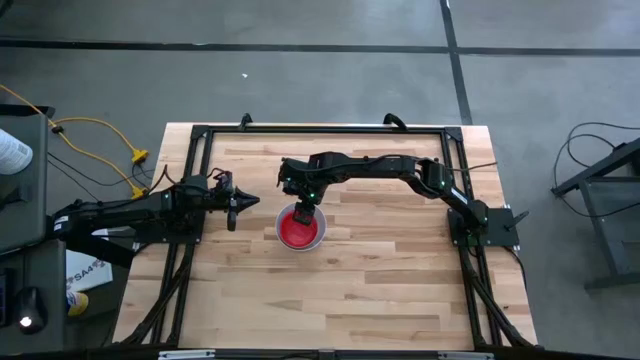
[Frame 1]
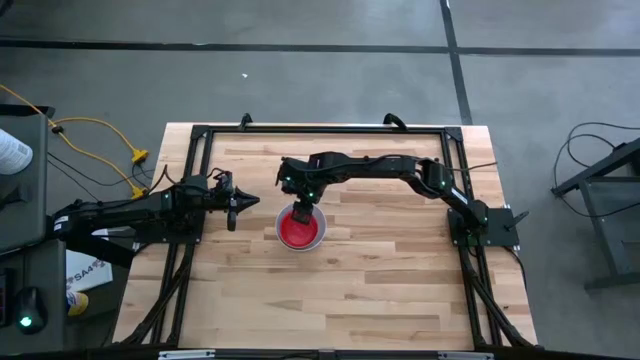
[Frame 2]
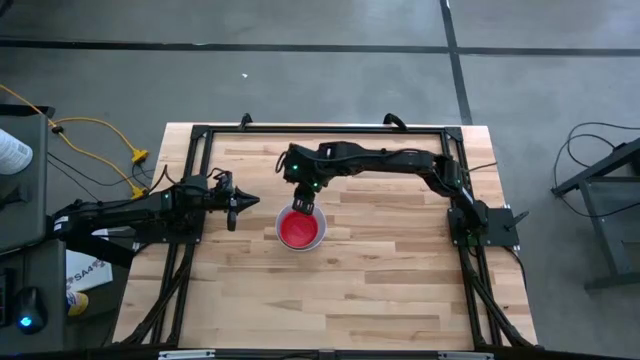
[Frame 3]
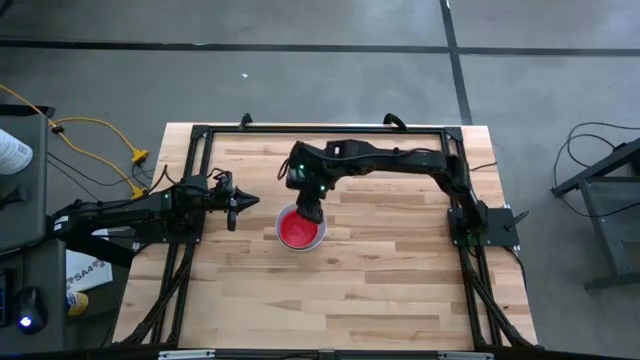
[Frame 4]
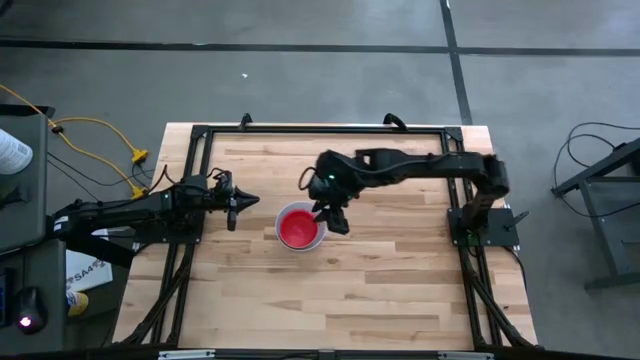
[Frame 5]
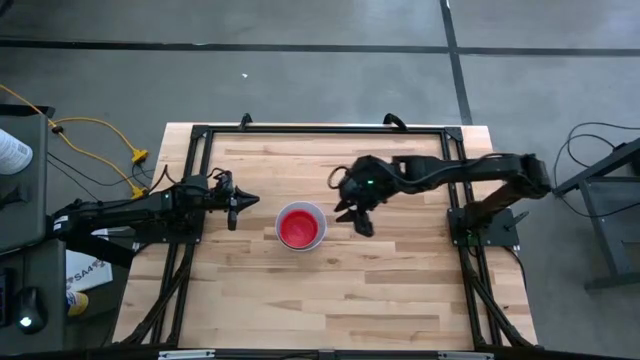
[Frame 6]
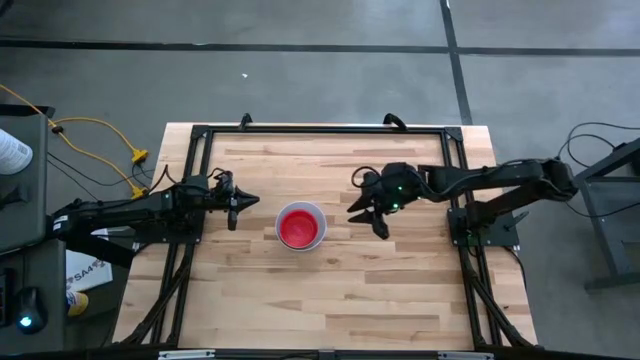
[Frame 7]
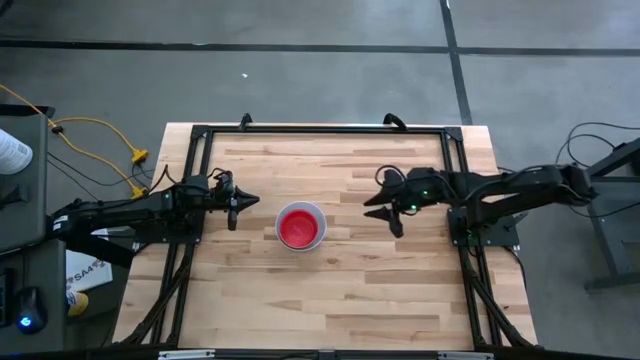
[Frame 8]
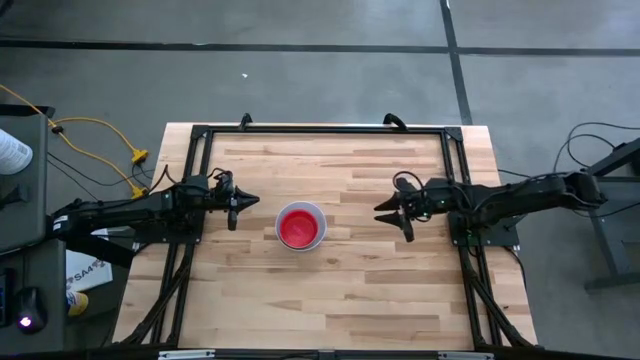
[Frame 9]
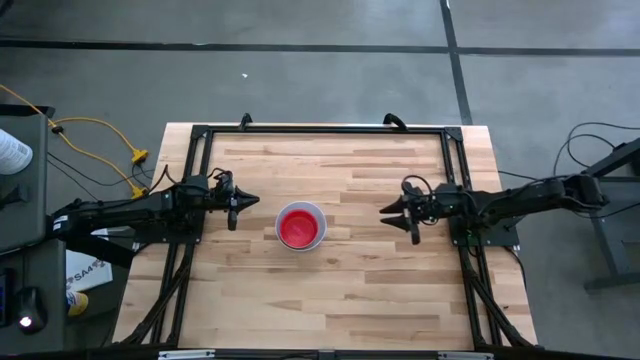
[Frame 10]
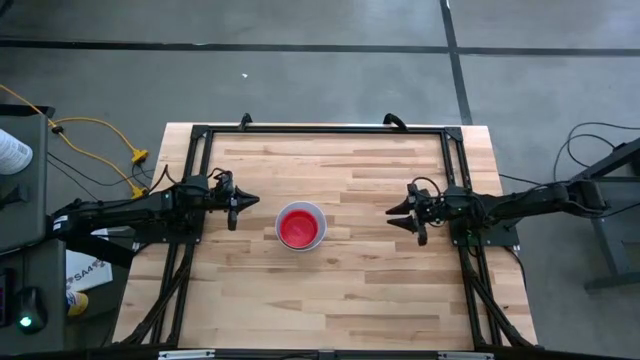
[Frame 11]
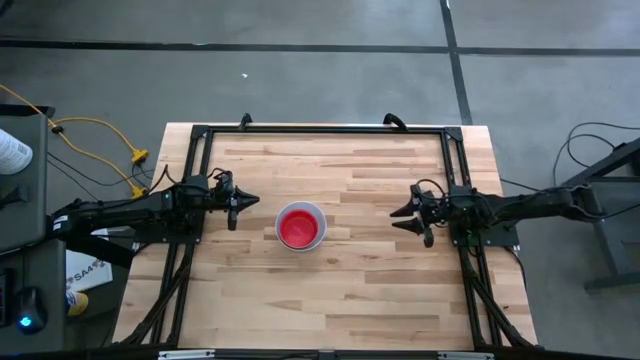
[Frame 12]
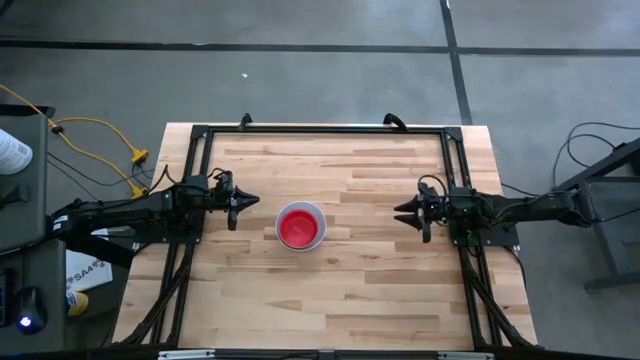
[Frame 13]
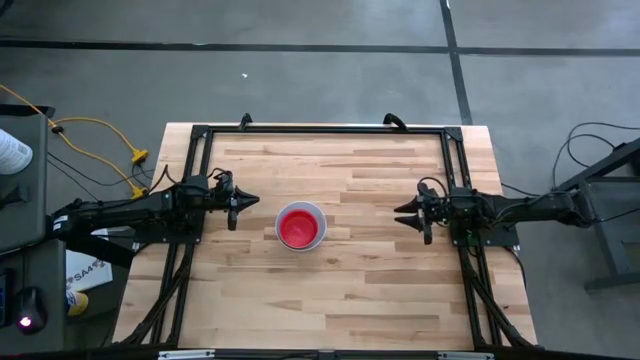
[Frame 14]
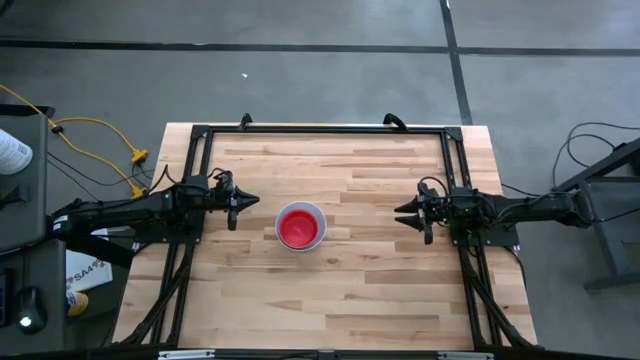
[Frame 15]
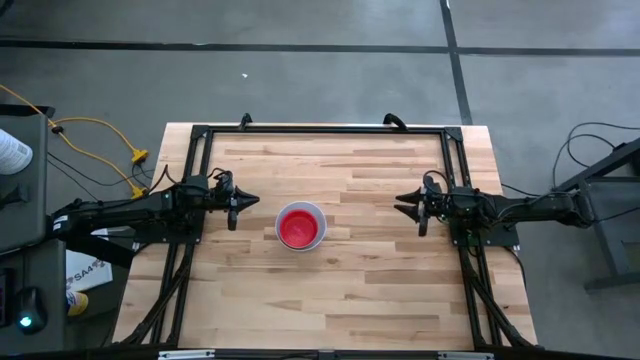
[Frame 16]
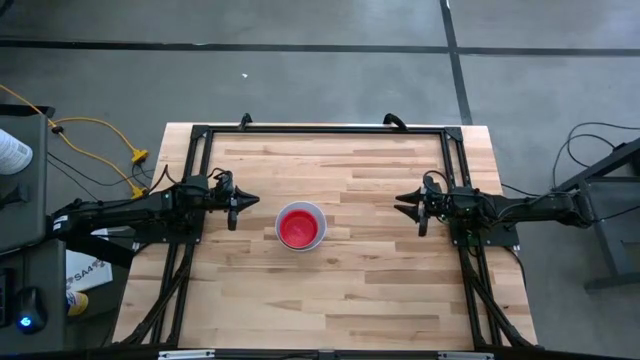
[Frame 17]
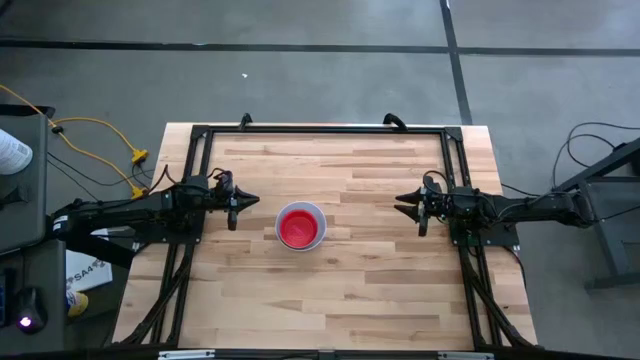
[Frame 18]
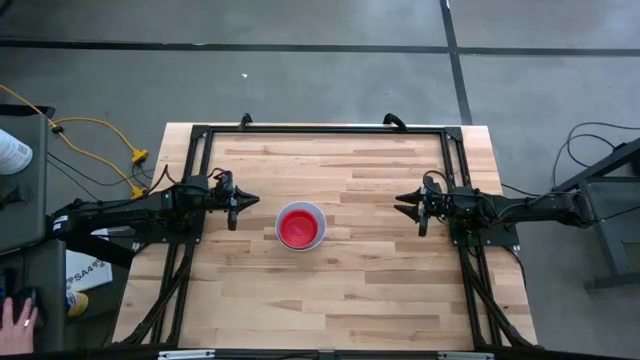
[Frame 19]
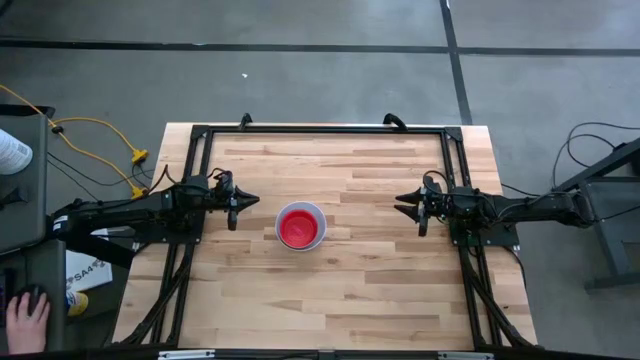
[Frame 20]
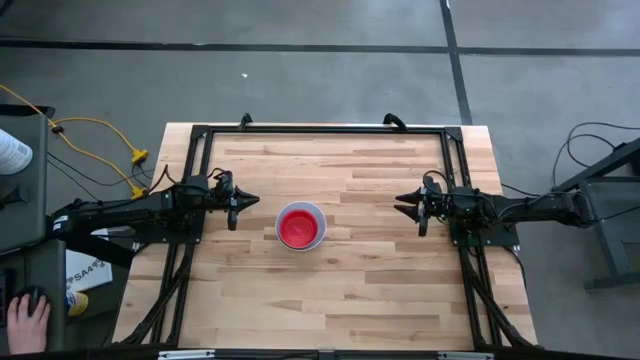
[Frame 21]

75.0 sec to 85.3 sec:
Return to Home Position
